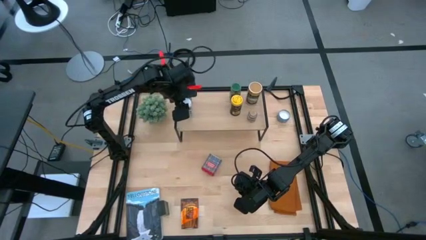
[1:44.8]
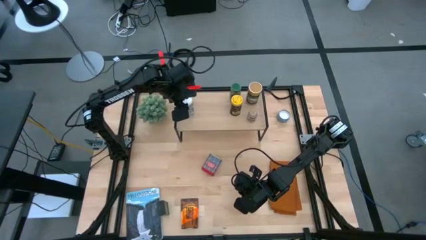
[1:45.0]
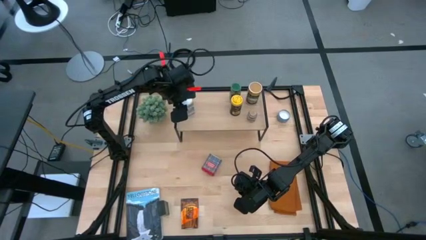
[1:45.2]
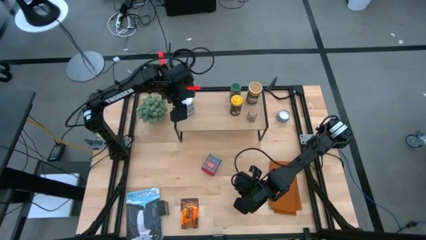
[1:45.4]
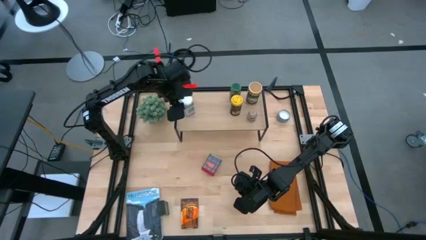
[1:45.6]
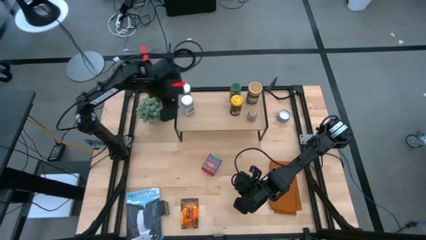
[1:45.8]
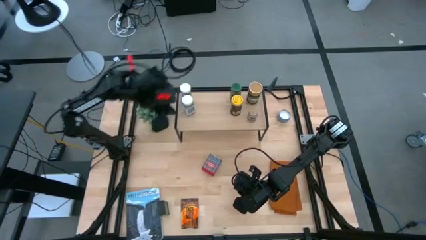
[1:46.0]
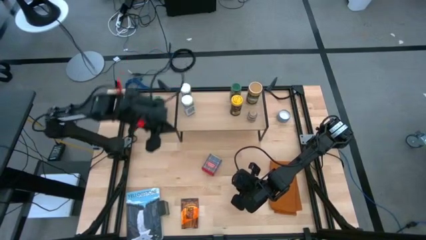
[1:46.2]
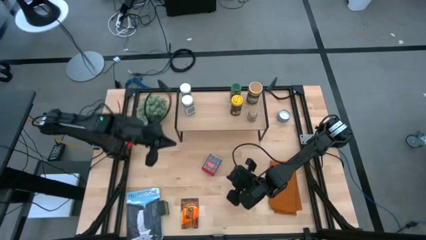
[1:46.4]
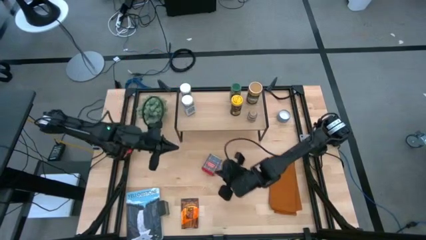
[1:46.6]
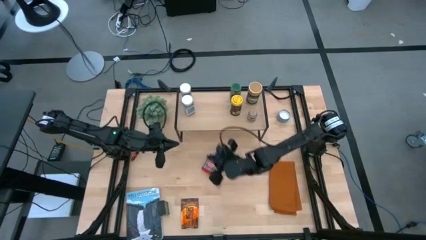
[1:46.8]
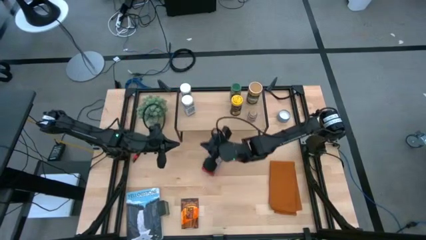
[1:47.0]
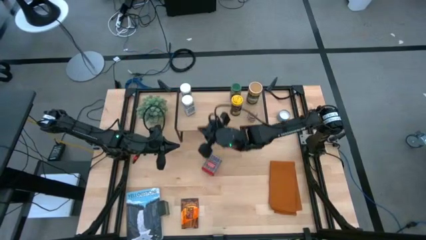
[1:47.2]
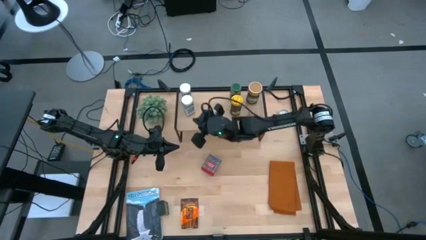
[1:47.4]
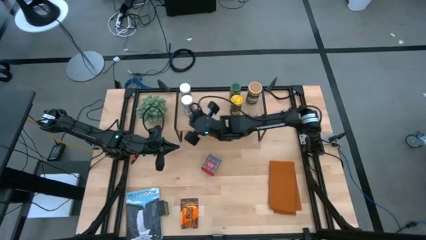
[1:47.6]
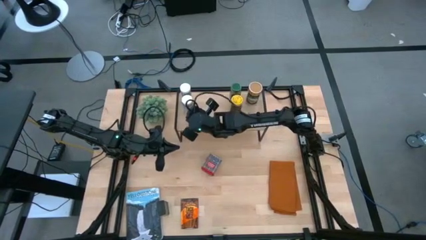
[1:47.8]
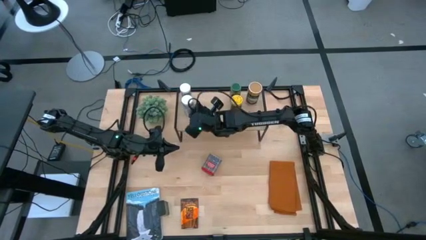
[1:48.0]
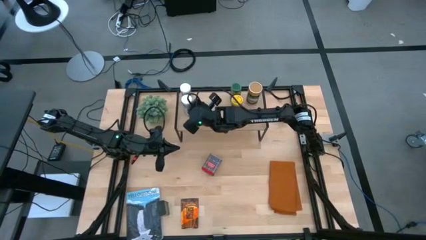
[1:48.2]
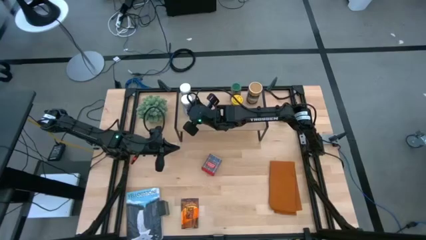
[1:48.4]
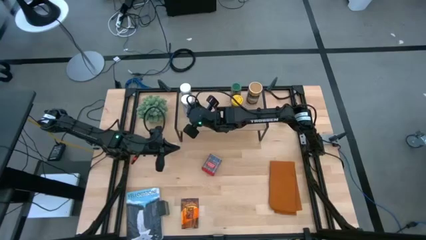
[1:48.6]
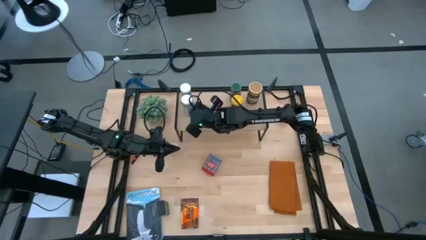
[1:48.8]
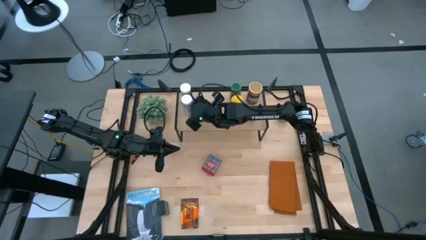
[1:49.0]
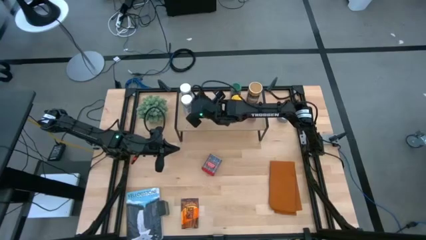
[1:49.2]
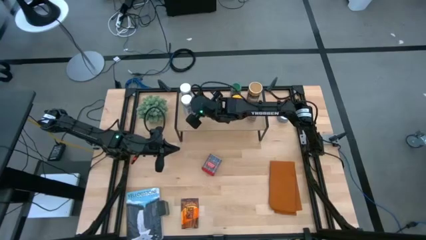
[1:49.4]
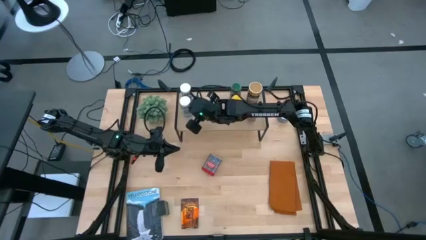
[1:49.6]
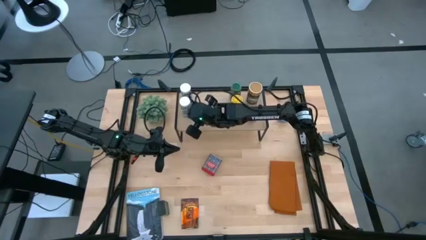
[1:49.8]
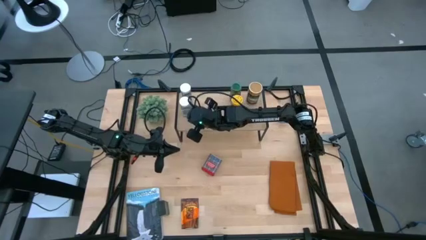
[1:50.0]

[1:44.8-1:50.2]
Task: Shelf spices
Put the white seasoning bottle on the shelf

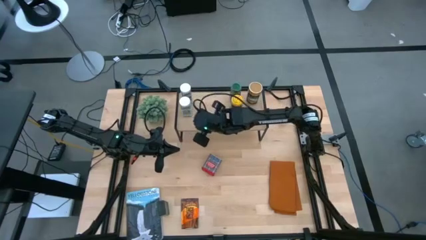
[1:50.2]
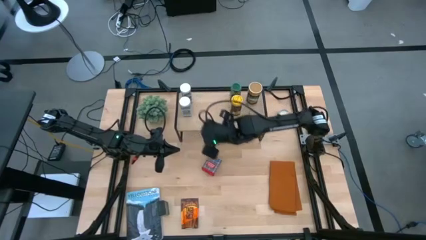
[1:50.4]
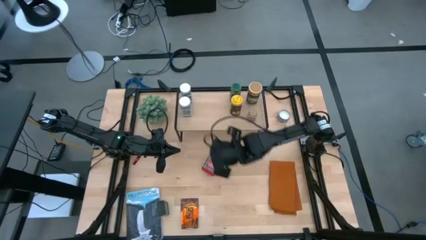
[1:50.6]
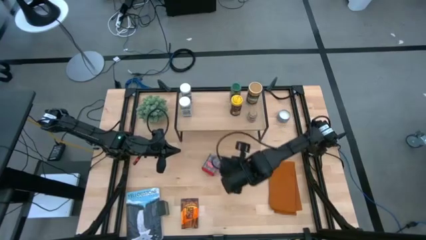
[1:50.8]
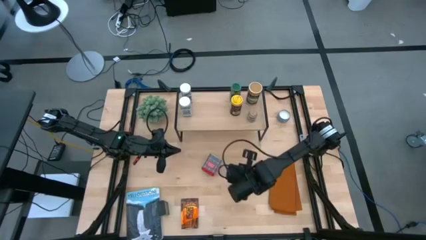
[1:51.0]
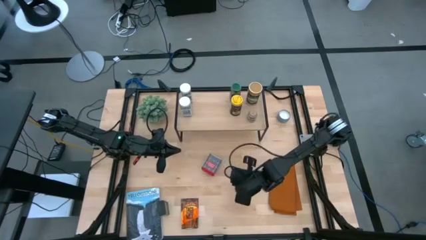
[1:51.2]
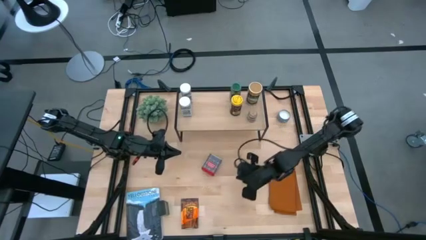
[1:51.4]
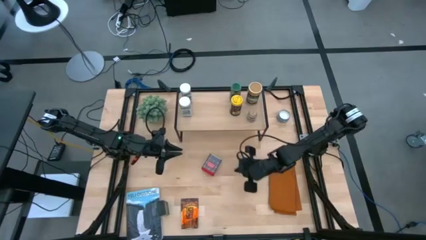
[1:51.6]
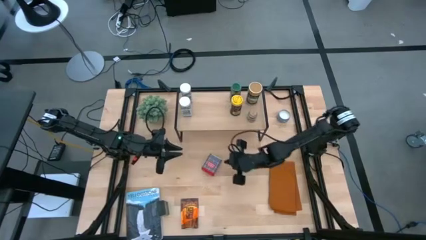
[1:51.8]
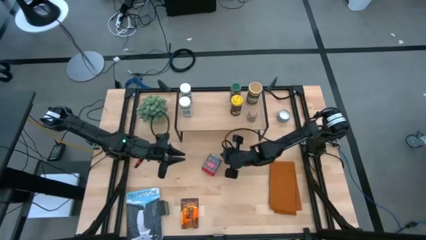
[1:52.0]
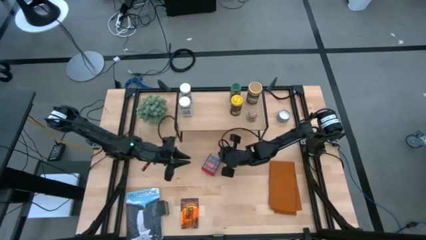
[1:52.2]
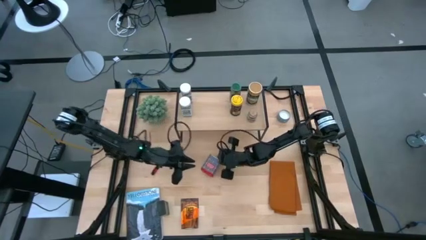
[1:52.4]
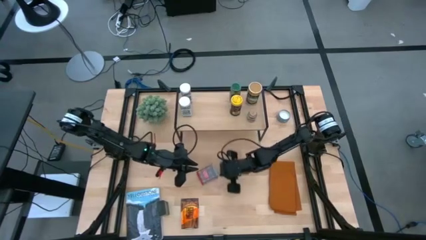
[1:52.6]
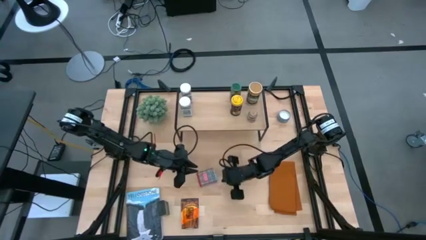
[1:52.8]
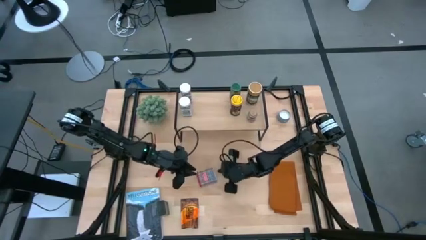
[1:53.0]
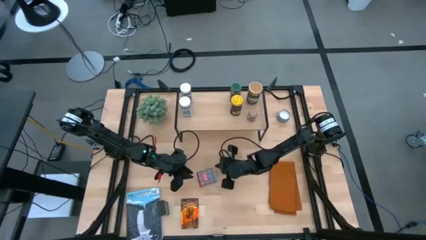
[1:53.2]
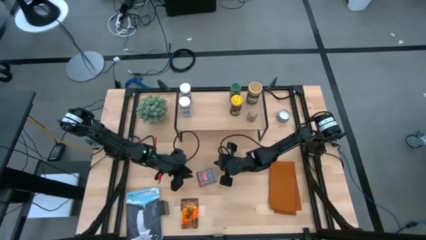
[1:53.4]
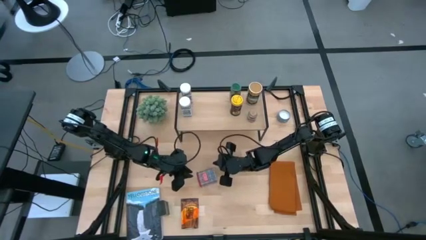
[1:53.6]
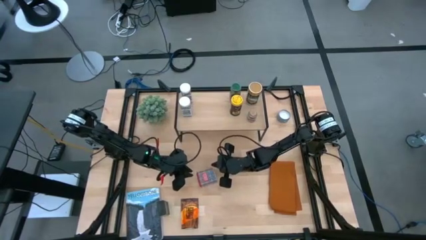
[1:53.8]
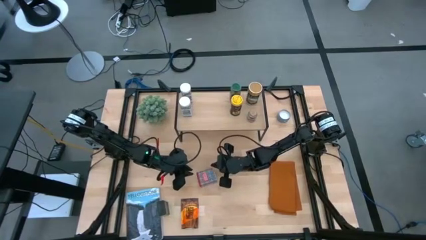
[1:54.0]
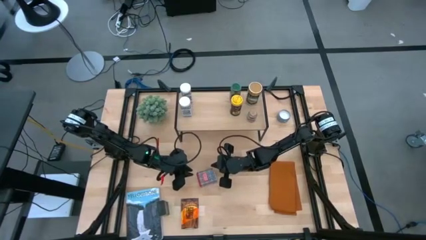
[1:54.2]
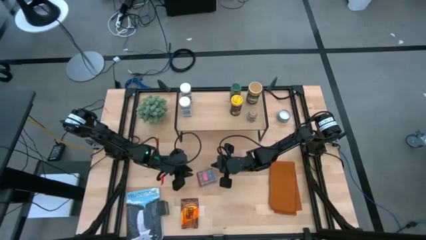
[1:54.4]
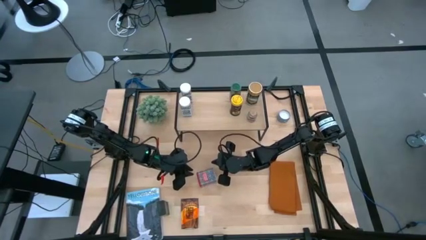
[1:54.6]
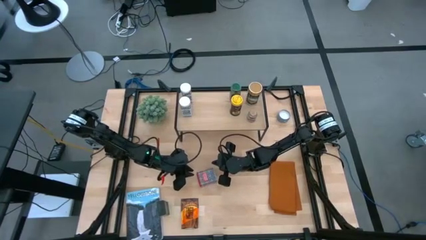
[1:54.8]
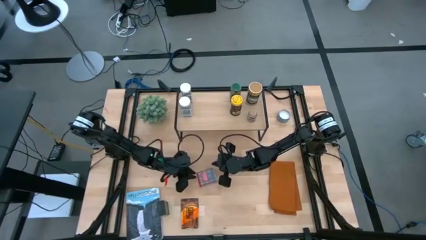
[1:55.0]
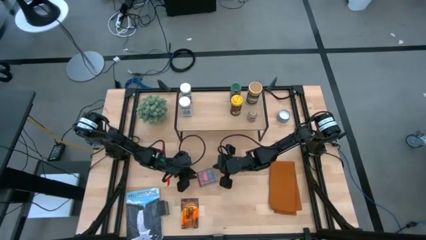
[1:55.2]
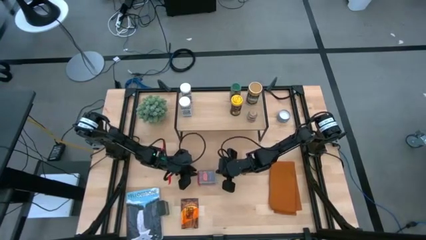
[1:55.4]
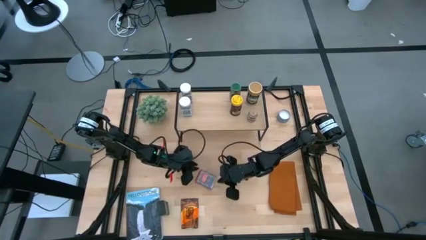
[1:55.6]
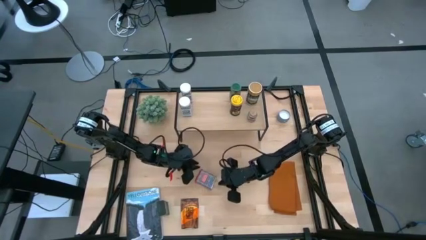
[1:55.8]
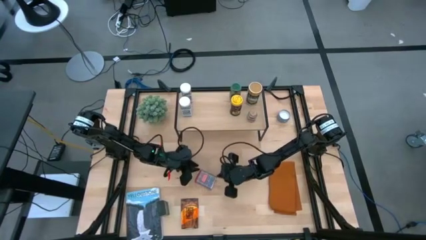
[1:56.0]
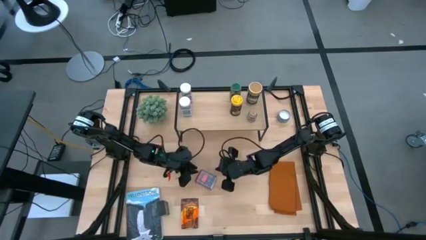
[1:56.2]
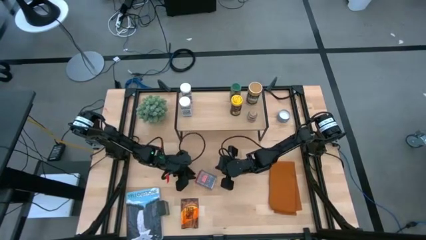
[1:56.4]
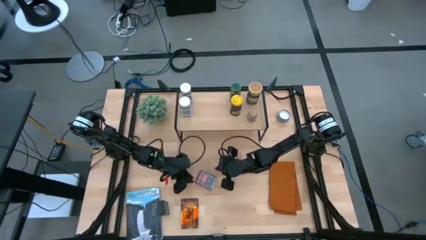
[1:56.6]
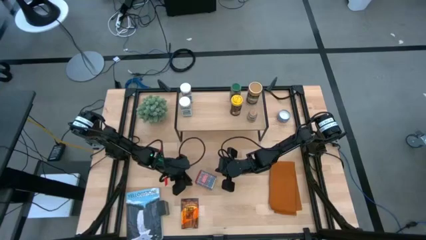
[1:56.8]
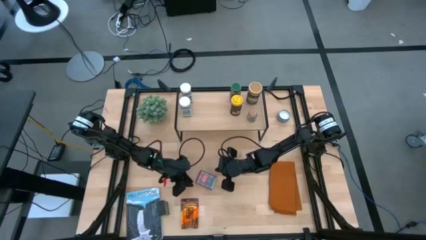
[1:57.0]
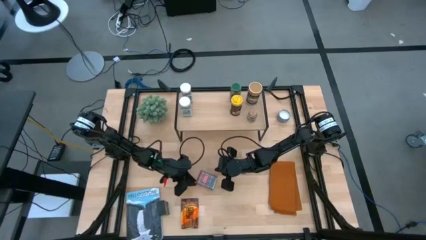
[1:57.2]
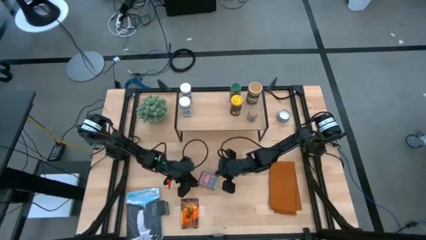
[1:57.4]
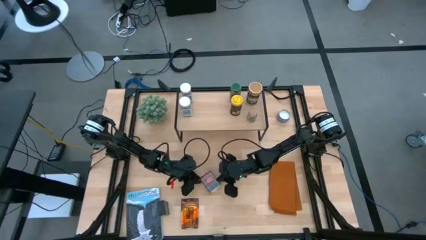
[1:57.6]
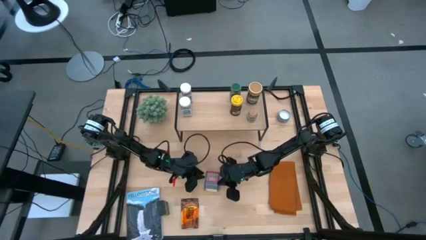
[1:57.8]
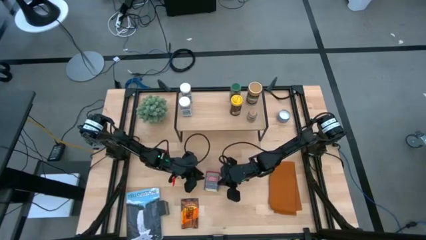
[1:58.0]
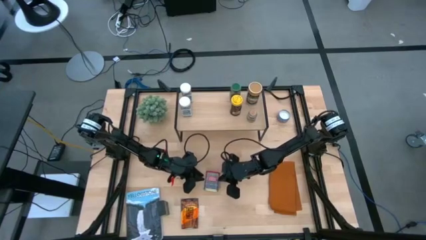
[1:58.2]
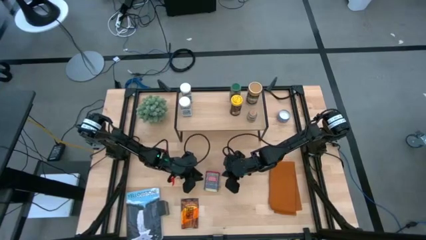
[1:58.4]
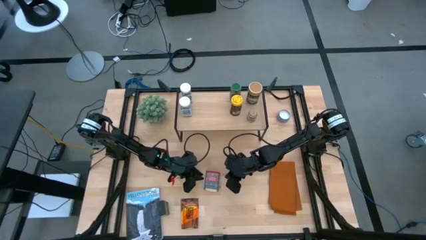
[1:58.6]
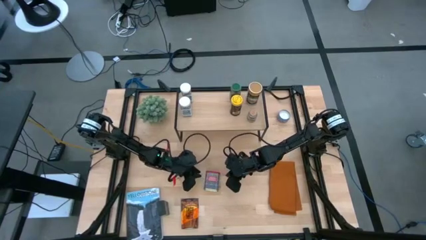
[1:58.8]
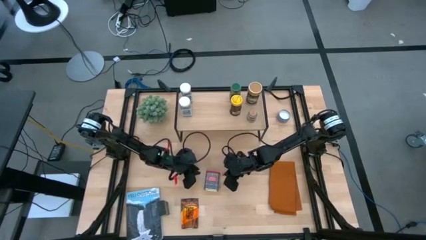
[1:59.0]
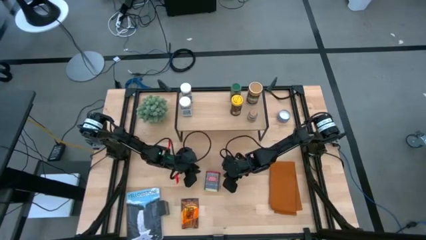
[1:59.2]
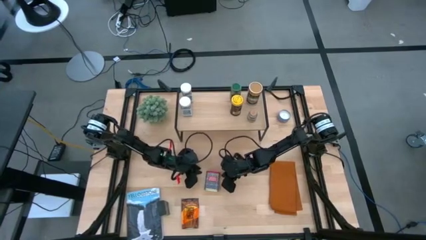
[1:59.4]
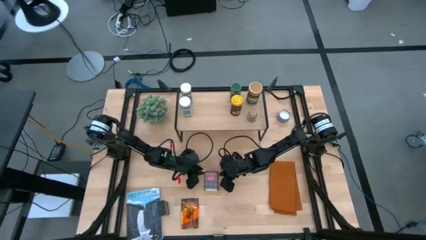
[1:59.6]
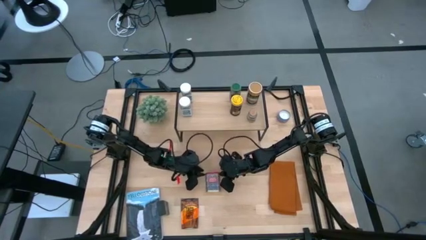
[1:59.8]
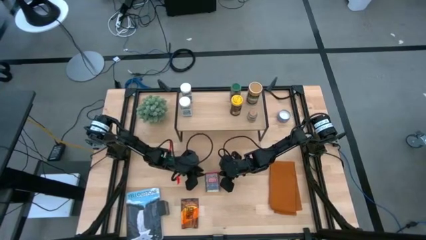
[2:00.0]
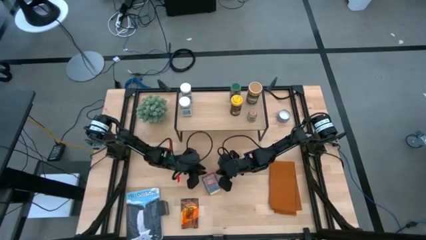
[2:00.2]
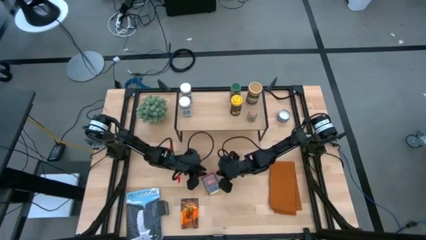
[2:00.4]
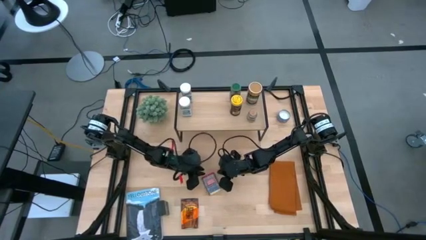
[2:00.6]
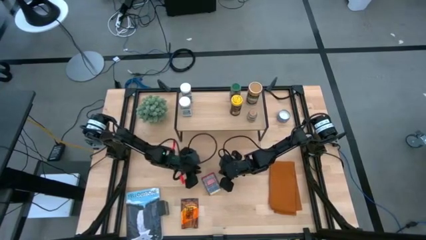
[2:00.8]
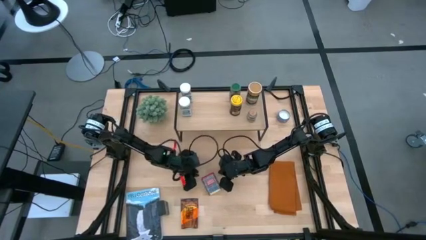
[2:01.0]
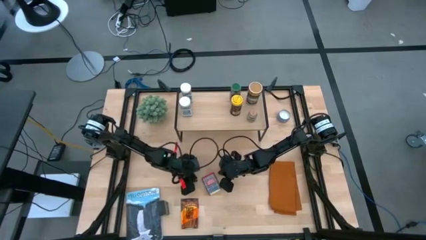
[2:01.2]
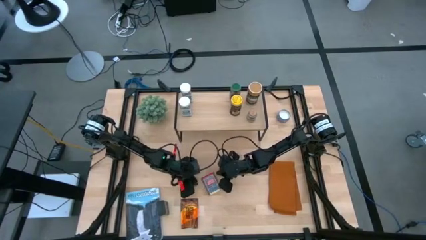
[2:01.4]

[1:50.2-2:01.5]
Put the red seasoning can onto the shelf
